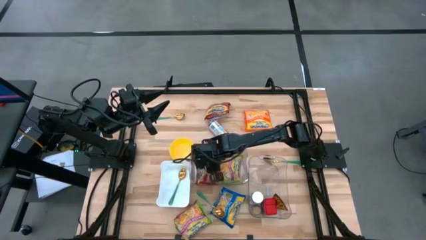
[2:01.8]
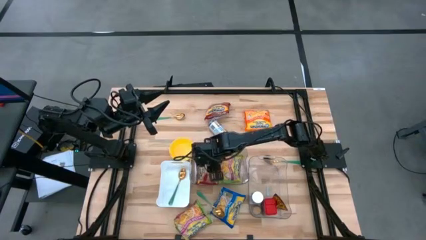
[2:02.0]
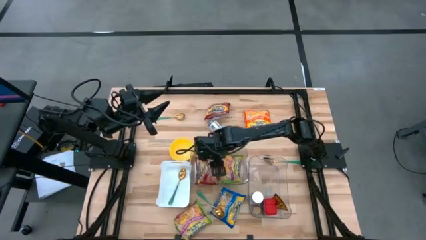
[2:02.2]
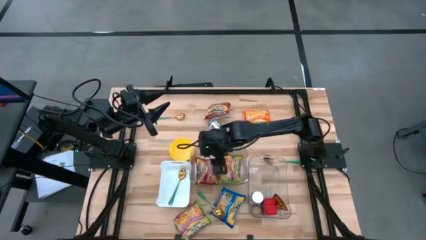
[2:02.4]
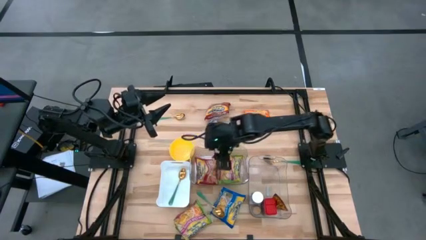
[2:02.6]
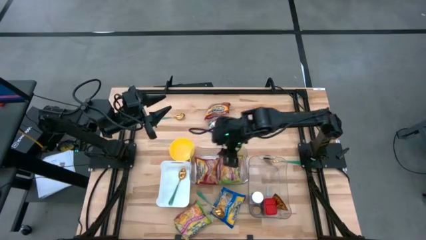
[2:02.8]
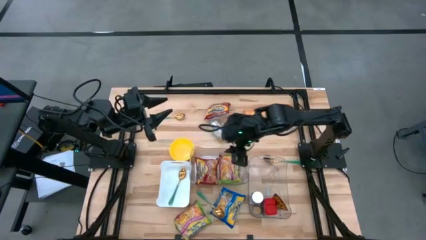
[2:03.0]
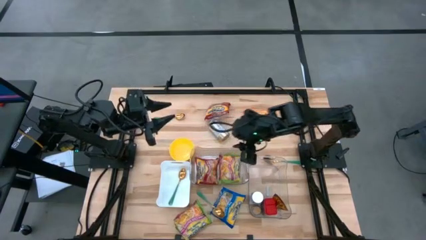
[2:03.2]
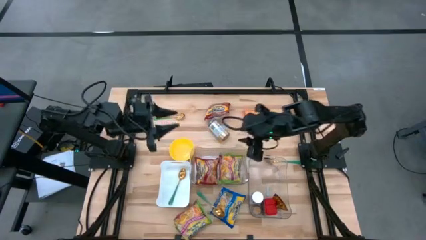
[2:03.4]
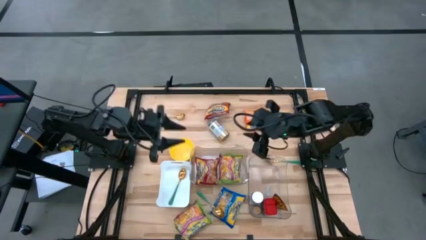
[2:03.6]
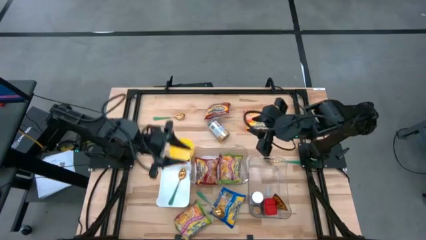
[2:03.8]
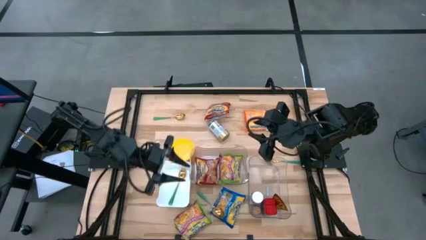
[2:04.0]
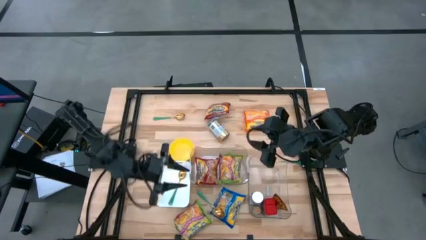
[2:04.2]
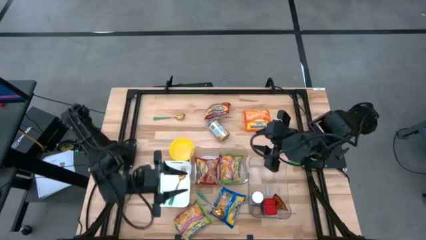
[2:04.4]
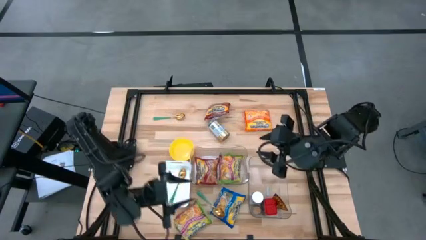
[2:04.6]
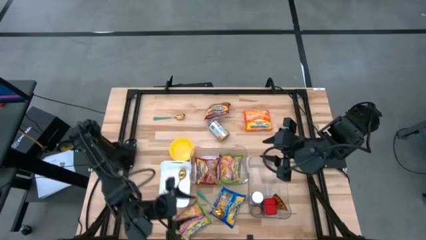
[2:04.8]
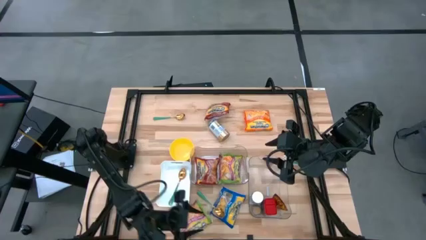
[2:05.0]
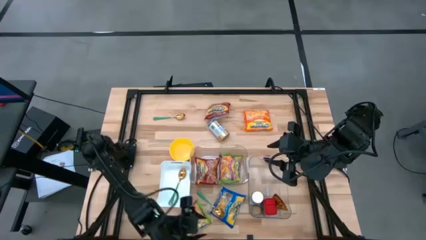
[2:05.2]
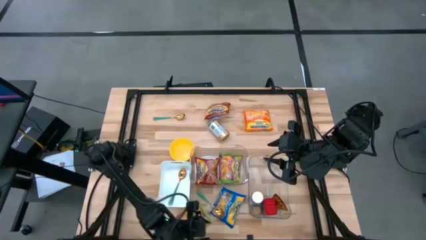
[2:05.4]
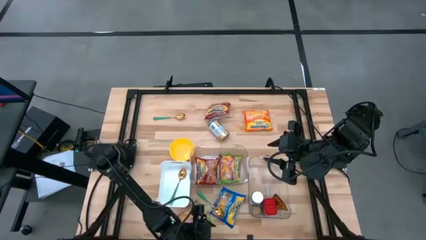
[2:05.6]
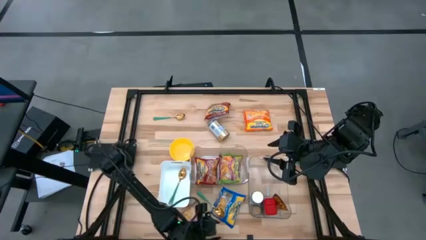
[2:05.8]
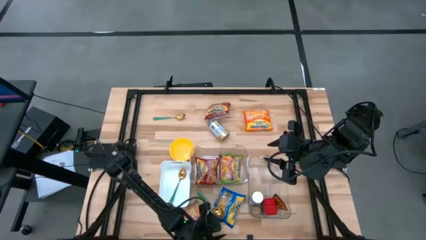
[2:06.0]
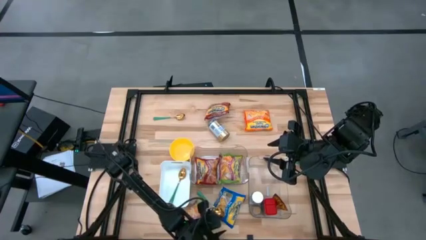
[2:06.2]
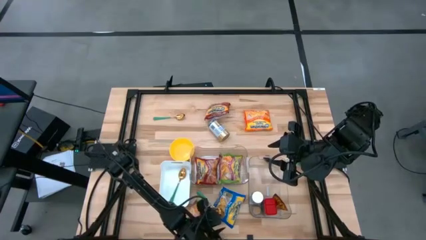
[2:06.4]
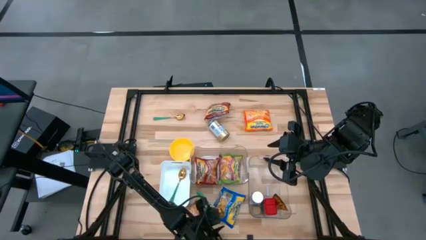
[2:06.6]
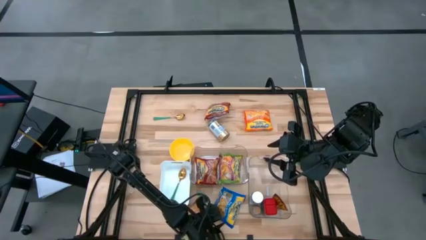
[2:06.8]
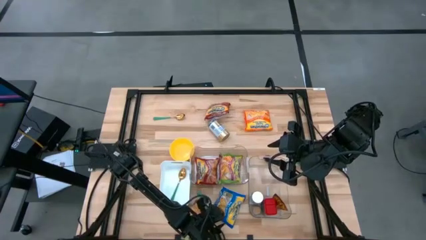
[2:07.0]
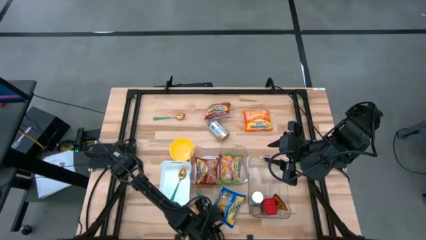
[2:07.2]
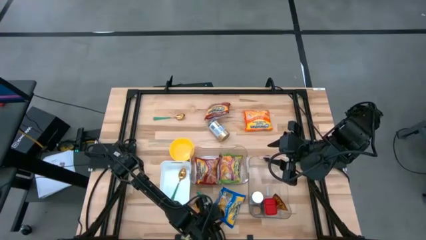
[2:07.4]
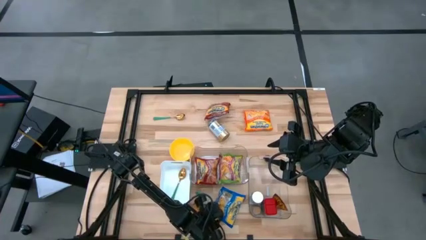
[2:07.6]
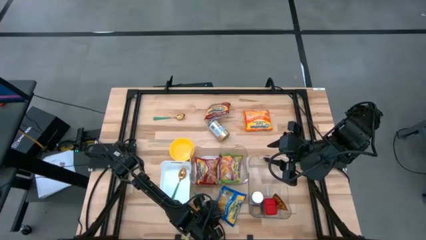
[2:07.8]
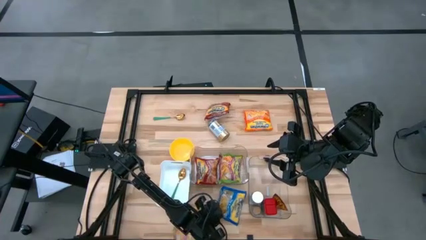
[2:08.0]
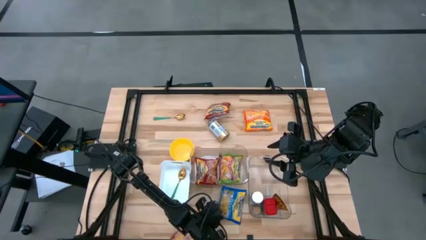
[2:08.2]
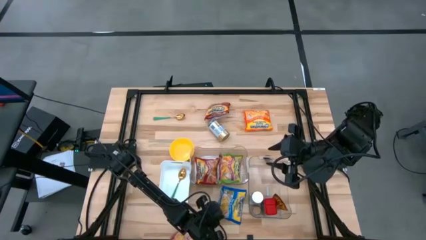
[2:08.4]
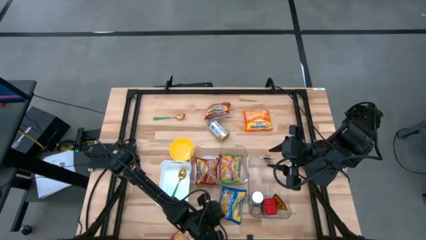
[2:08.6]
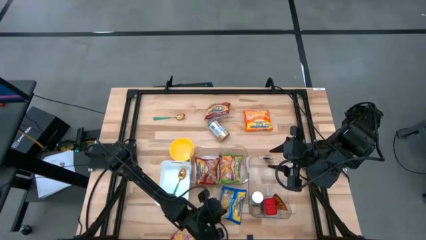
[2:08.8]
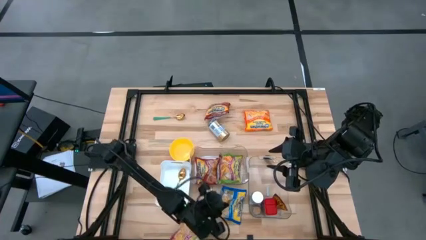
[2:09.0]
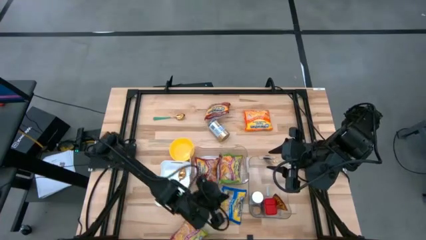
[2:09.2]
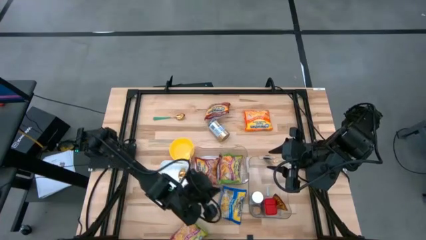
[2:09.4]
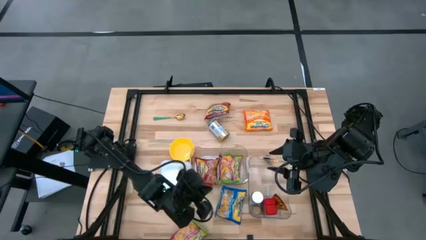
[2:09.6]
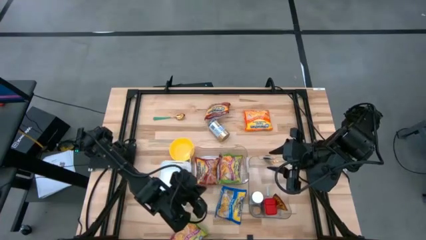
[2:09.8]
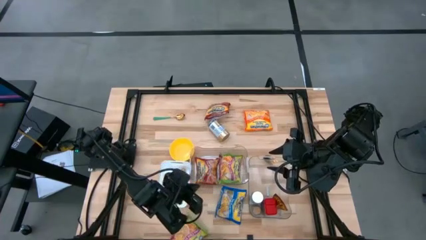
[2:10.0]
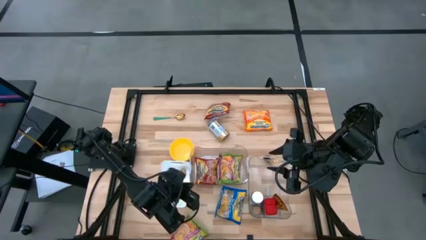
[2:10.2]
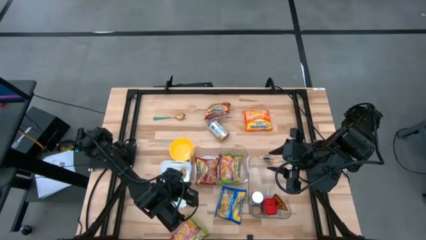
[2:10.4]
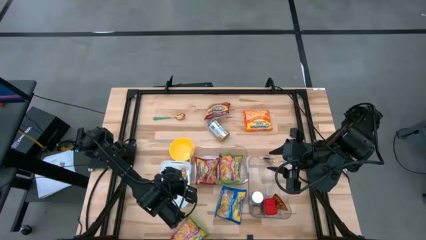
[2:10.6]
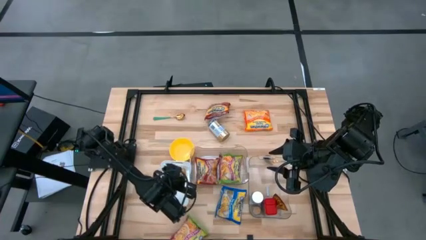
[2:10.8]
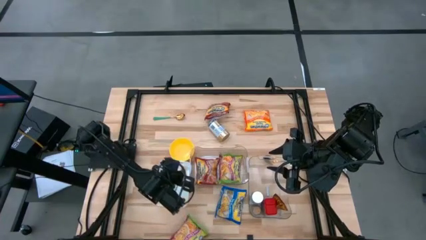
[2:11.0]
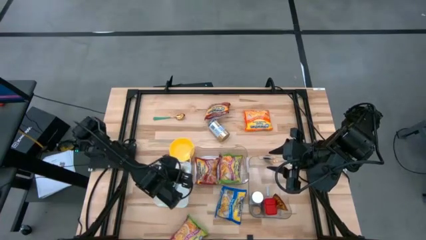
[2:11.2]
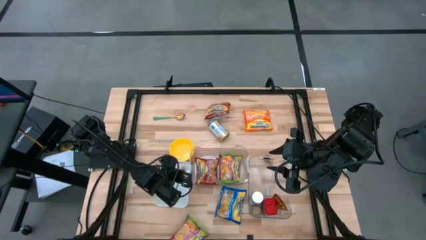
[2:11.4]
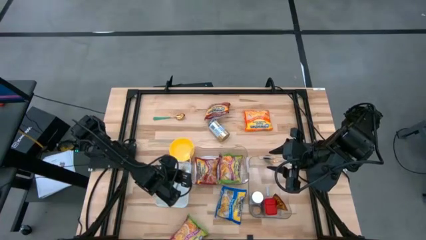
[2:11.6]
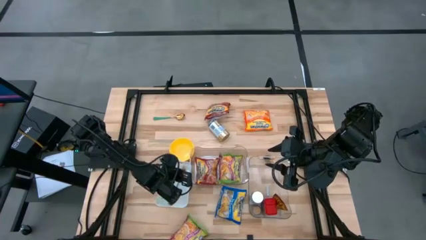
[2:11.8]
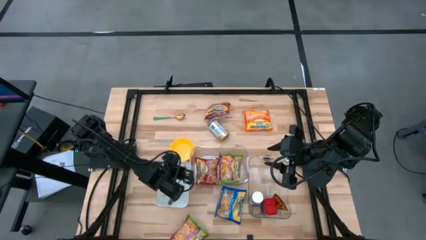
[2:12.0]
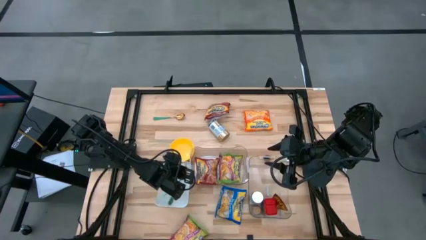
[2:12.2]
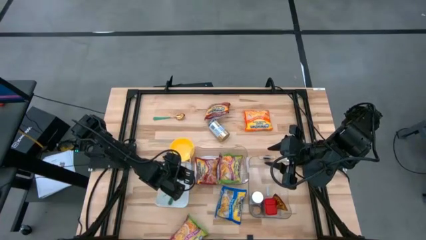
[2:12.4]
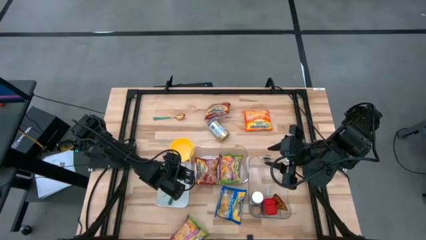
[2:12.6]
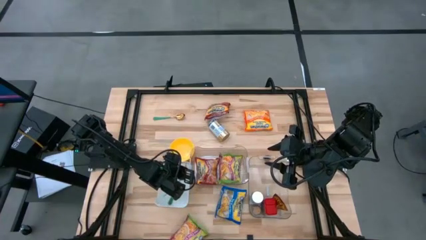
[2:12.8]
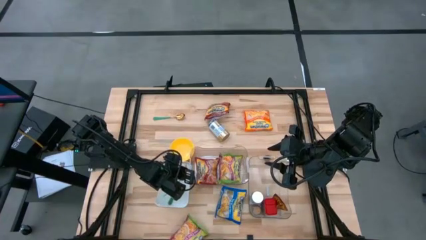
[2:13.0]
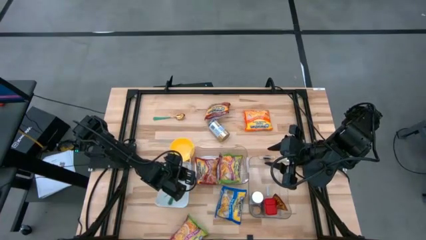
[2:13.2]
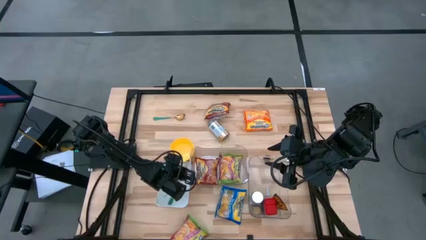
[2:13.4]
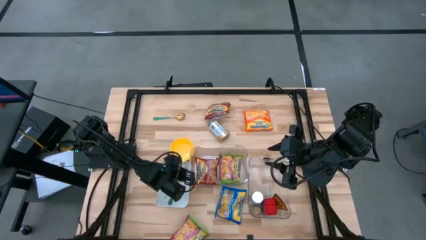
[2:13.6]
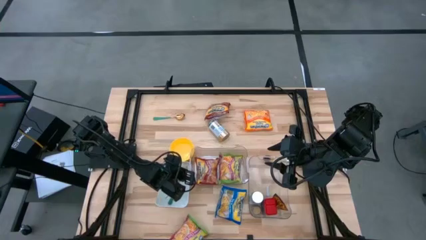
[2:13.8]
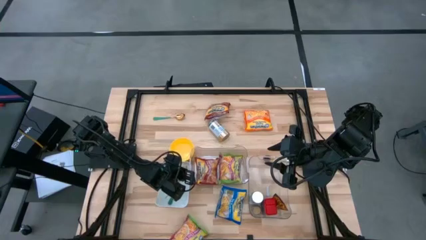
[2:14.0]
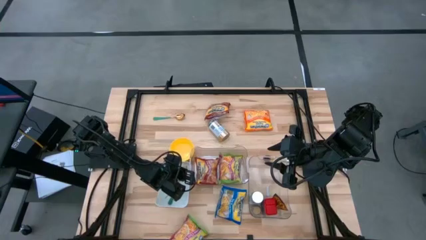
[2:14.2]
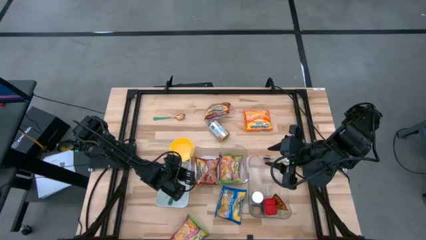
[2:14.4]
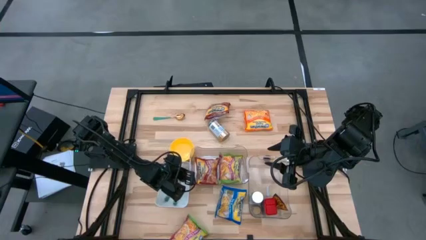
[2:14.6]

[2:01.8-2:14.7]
Task: Pick & Place Food Item
Put the green spoon into the white bin

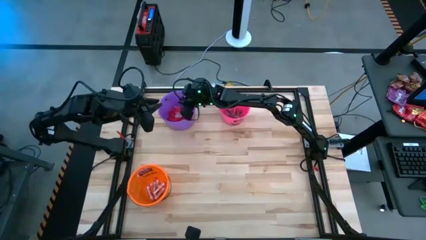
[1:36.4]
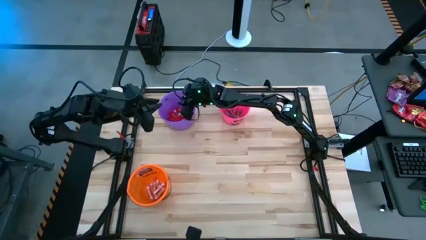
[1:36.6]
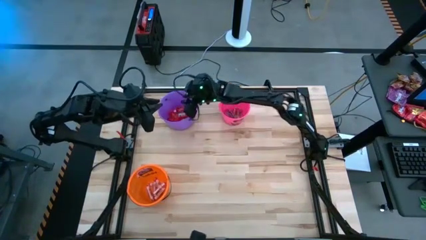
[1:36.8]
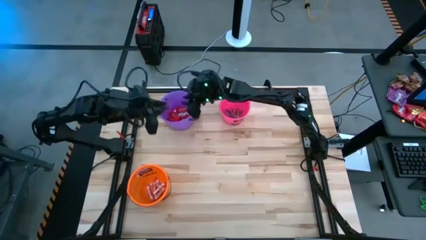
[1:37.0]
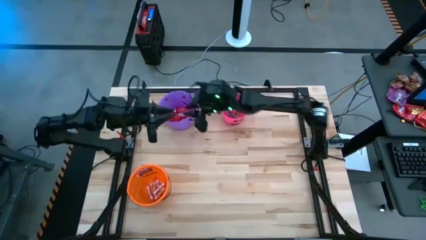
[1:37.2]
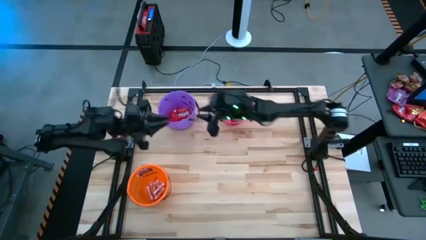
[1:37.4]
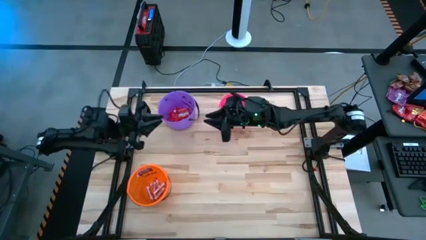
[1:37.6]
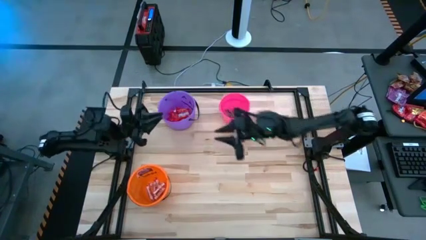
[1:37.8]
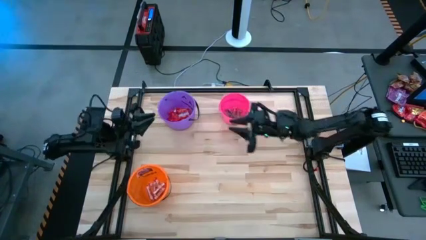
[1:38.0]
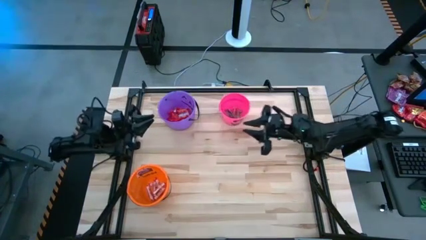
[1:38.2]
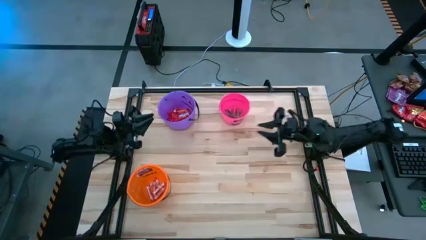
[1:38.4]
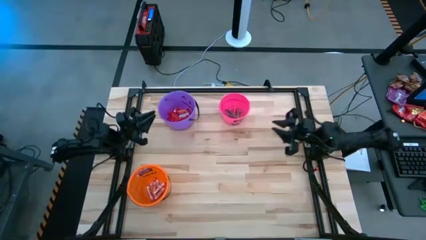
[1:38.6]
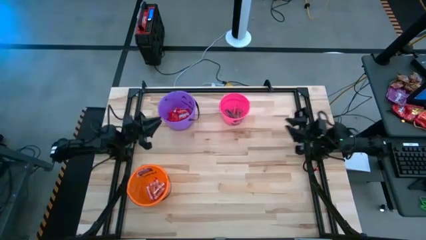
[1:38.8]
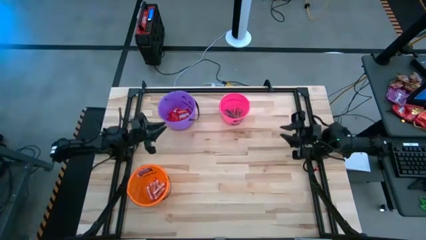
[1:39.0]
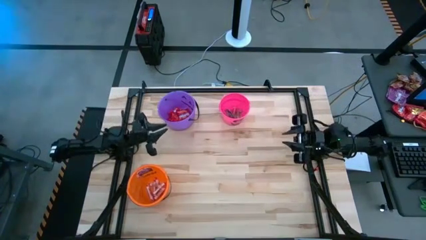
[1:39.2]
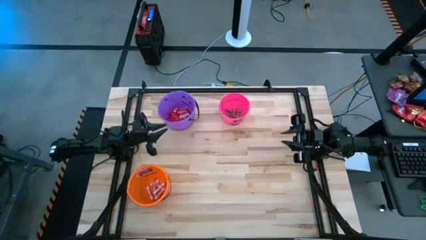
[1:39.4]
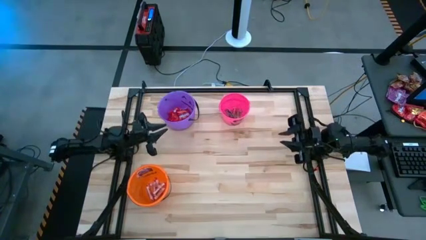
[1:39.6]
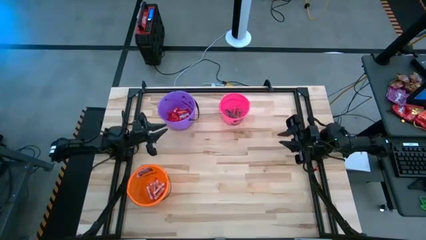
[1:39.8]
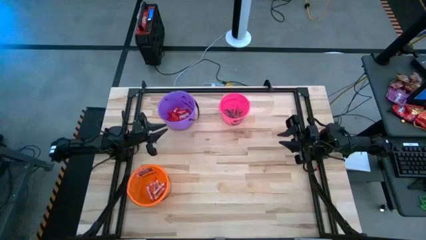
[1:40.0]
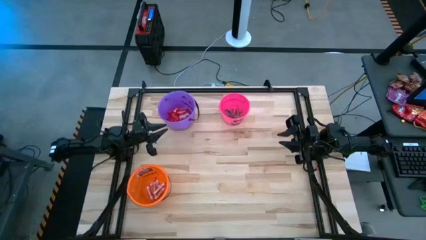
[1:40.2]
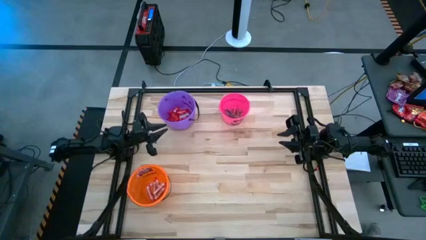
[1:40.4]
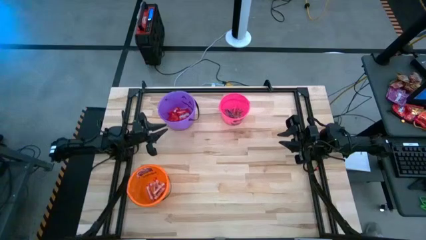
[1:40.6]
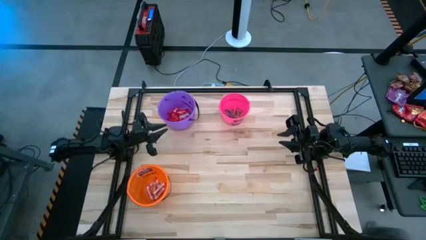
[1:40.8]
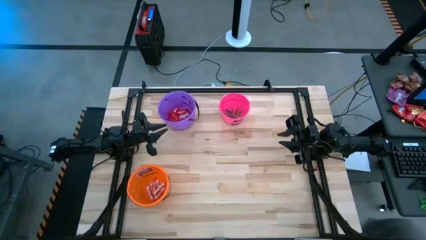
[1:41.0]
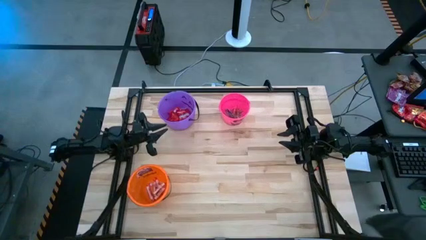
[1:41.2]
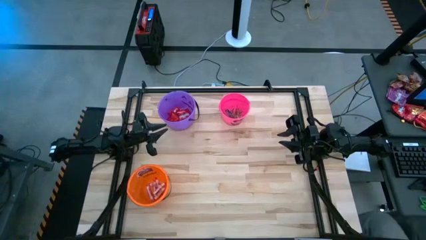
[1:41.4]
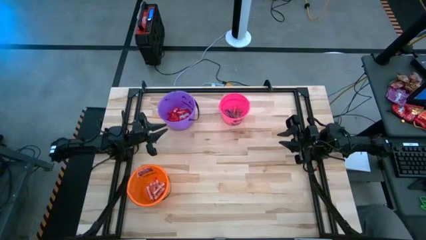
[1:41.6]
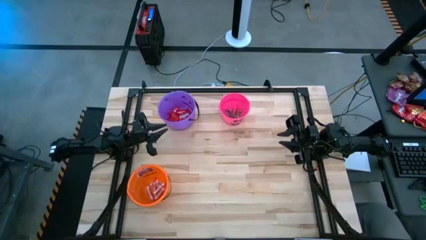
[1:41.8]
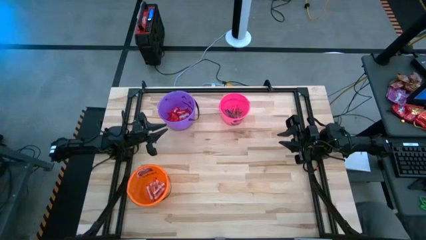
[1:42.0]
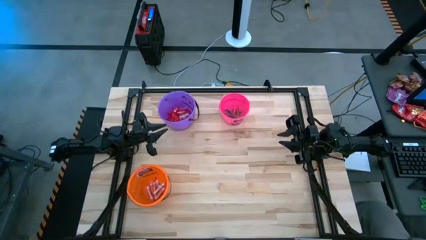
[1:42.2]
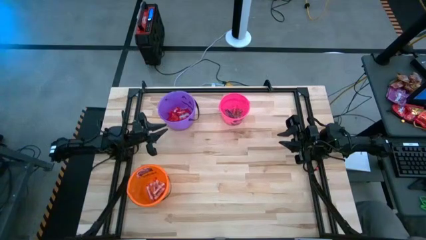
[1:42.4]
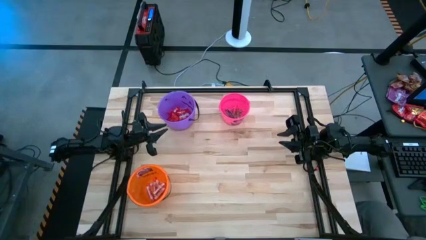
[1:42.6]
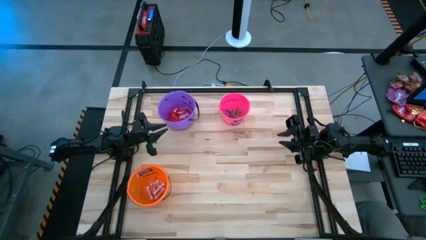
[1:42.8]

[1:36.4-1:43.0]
Task: Sort candy by brand, put in halloween buckets
Return to Home Position
